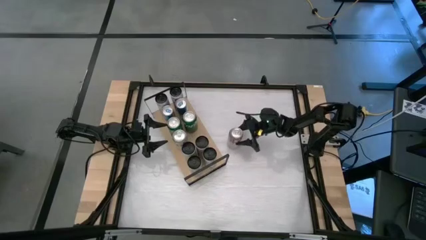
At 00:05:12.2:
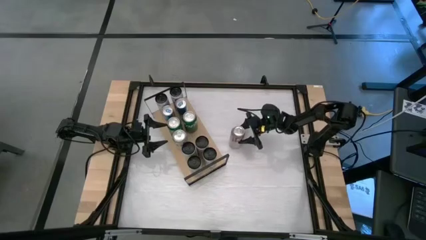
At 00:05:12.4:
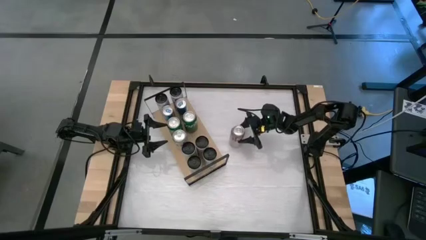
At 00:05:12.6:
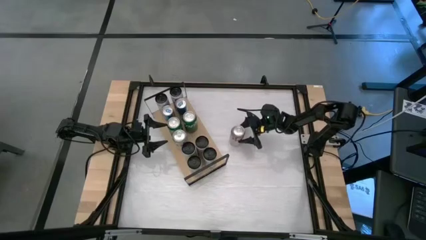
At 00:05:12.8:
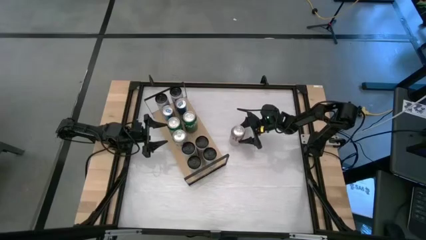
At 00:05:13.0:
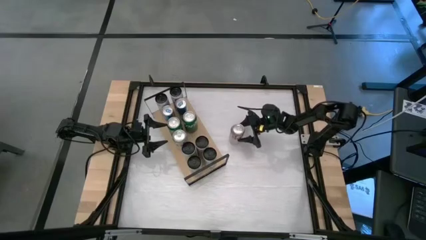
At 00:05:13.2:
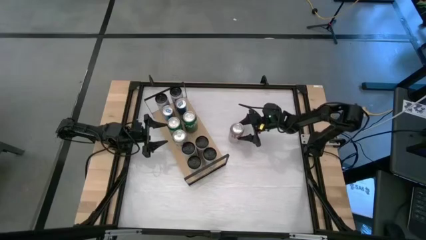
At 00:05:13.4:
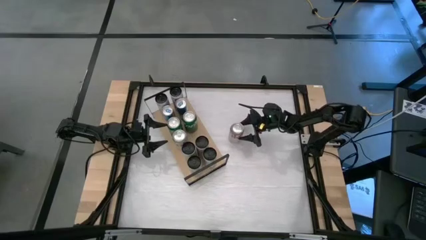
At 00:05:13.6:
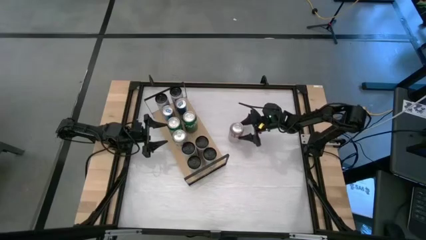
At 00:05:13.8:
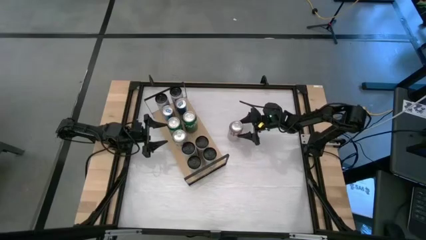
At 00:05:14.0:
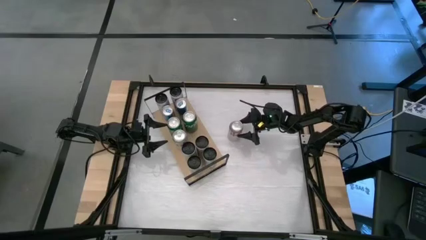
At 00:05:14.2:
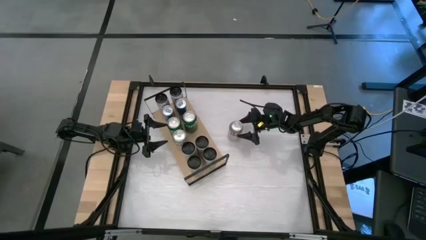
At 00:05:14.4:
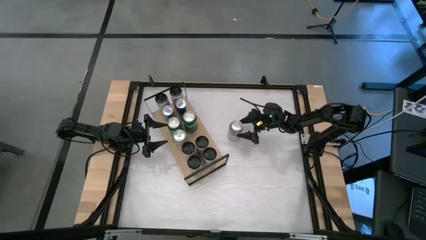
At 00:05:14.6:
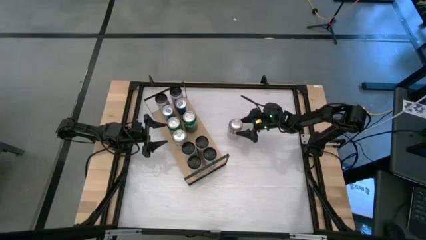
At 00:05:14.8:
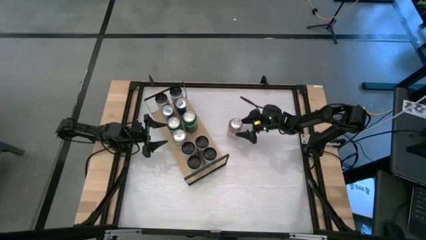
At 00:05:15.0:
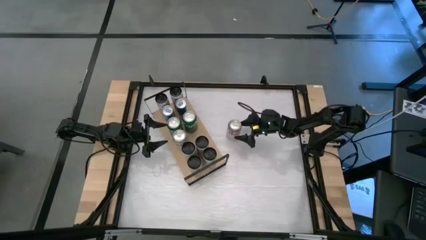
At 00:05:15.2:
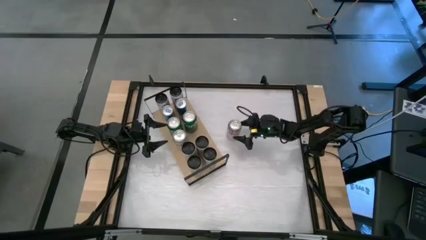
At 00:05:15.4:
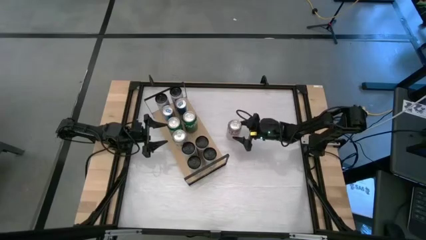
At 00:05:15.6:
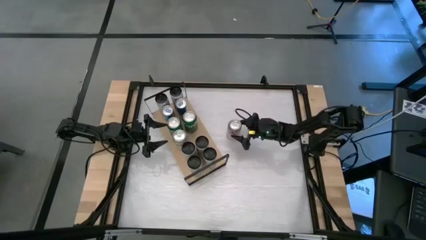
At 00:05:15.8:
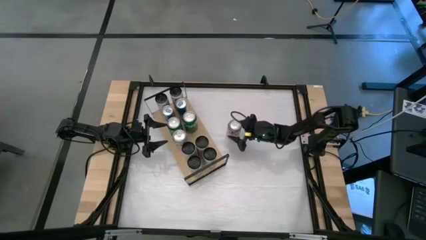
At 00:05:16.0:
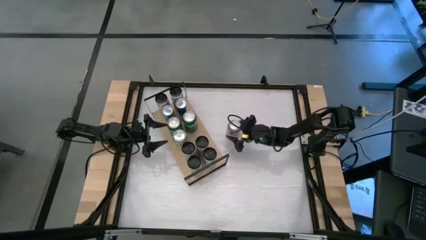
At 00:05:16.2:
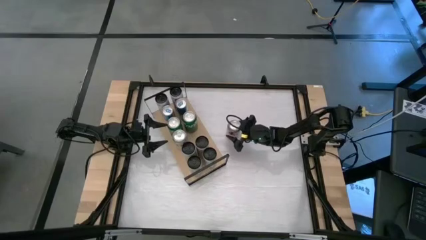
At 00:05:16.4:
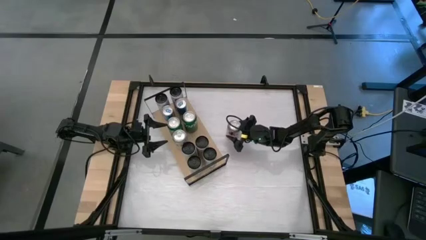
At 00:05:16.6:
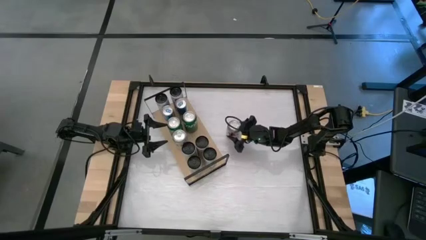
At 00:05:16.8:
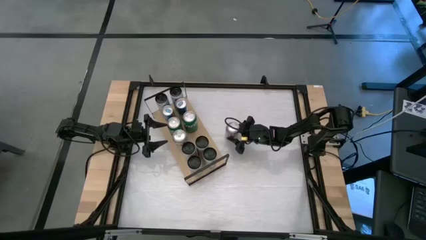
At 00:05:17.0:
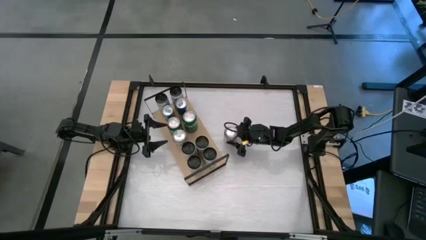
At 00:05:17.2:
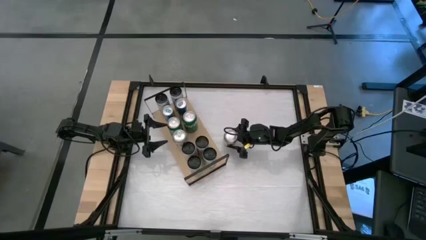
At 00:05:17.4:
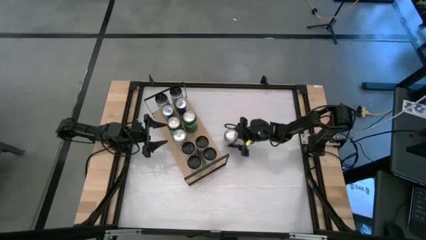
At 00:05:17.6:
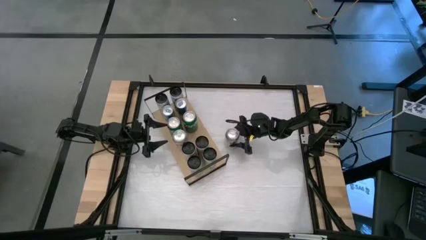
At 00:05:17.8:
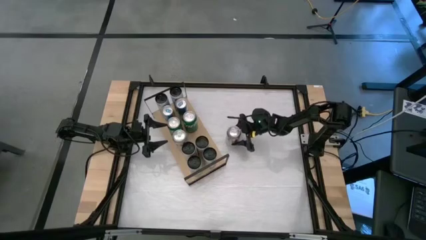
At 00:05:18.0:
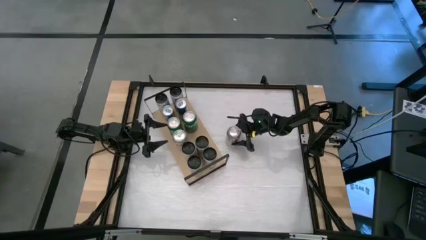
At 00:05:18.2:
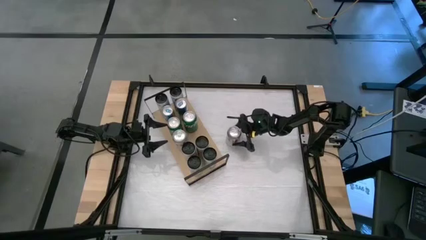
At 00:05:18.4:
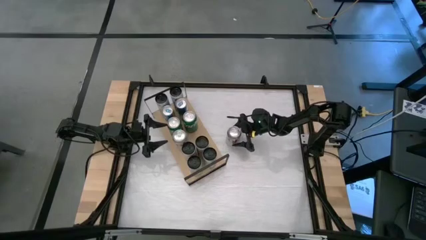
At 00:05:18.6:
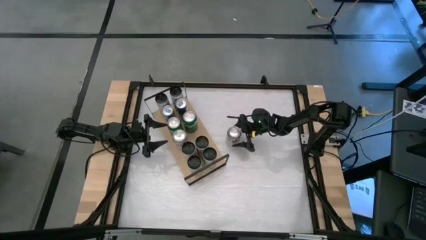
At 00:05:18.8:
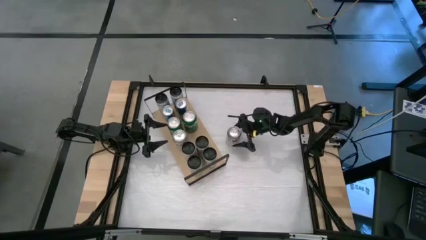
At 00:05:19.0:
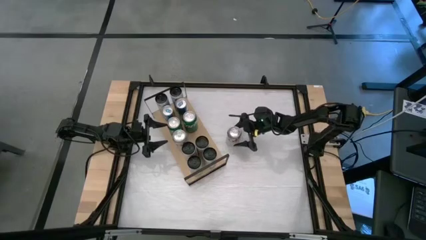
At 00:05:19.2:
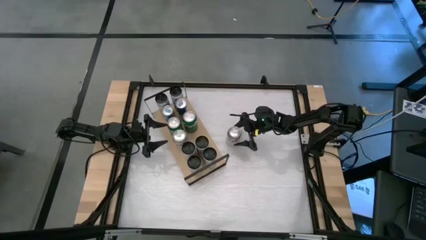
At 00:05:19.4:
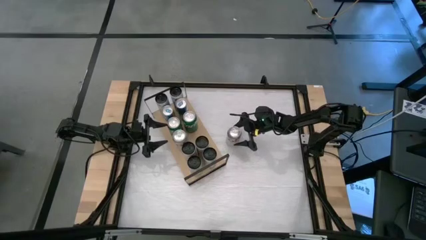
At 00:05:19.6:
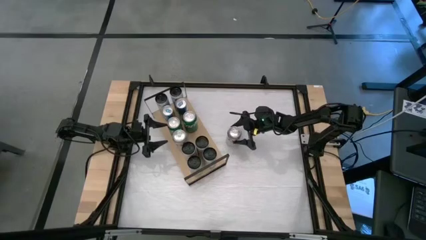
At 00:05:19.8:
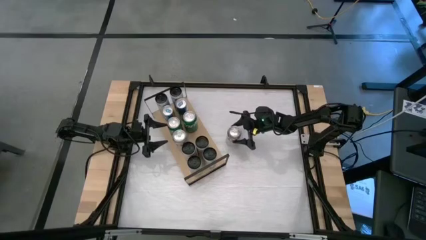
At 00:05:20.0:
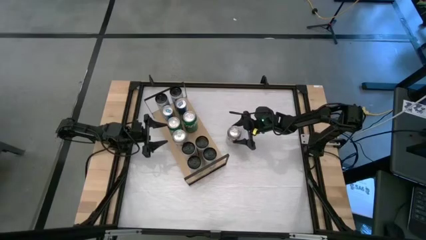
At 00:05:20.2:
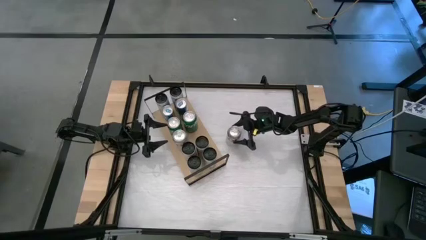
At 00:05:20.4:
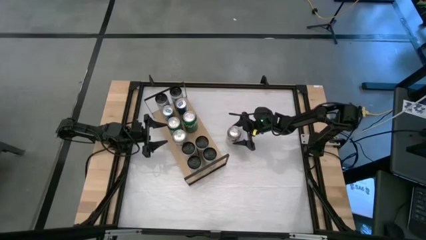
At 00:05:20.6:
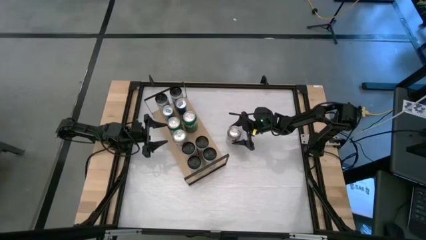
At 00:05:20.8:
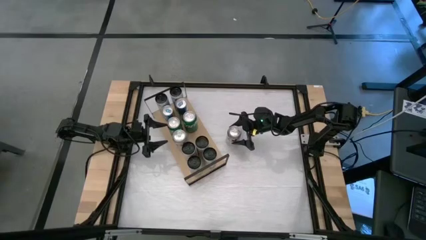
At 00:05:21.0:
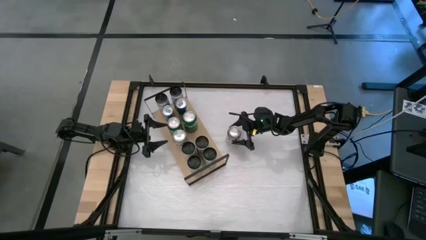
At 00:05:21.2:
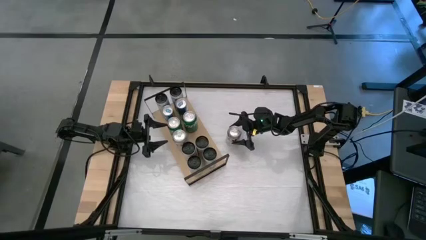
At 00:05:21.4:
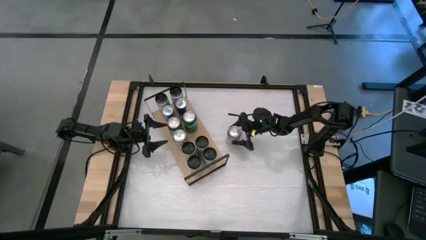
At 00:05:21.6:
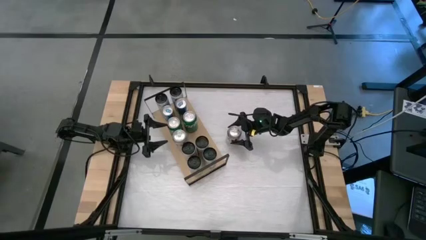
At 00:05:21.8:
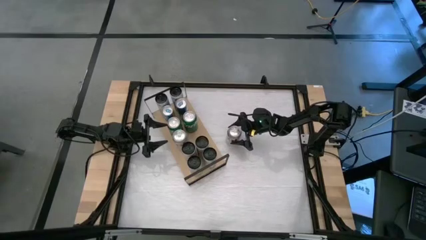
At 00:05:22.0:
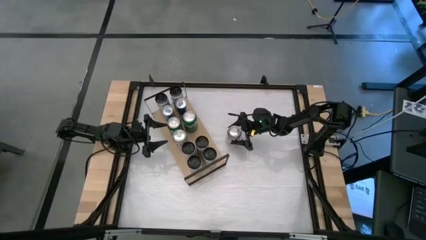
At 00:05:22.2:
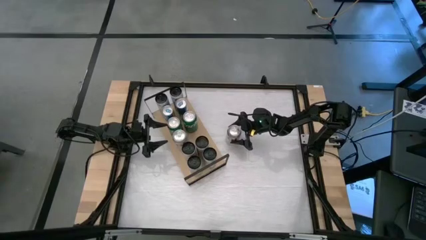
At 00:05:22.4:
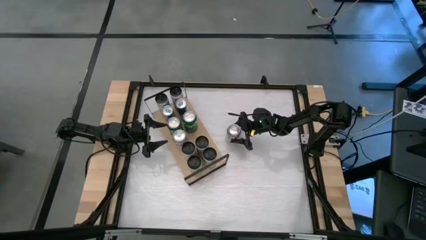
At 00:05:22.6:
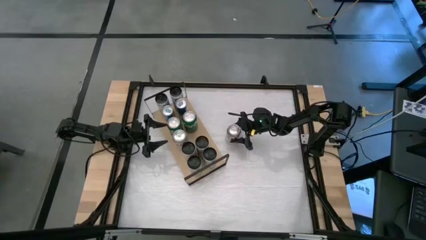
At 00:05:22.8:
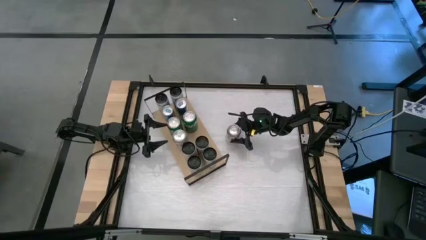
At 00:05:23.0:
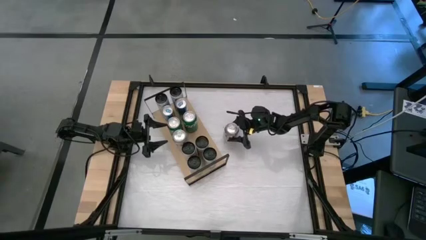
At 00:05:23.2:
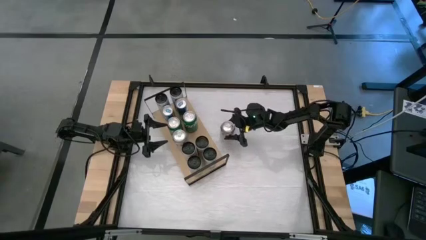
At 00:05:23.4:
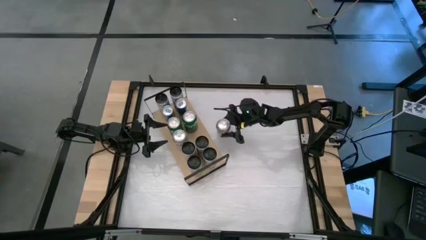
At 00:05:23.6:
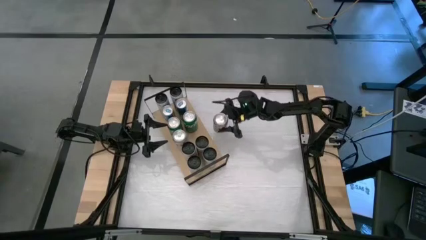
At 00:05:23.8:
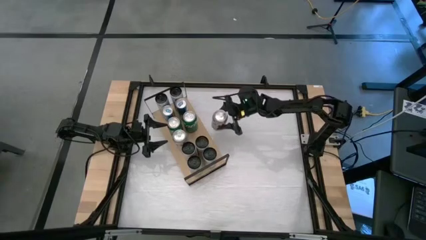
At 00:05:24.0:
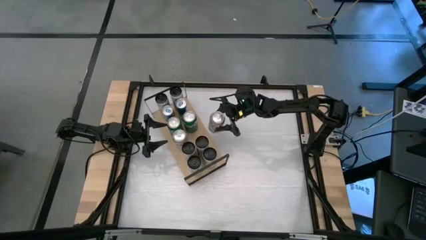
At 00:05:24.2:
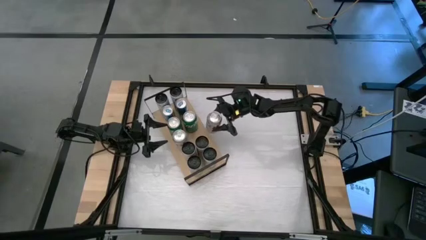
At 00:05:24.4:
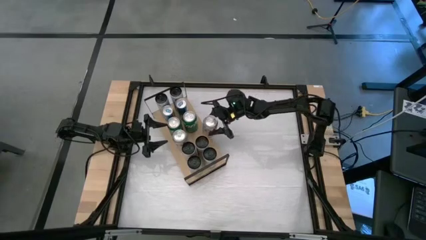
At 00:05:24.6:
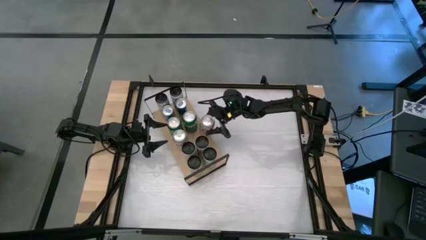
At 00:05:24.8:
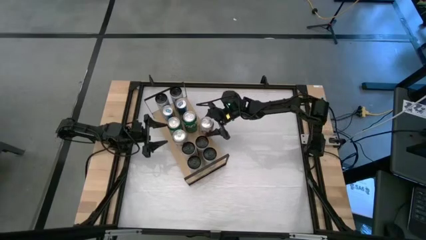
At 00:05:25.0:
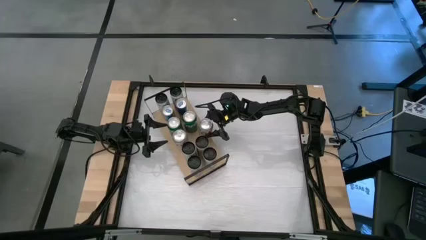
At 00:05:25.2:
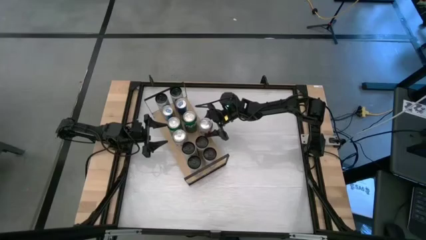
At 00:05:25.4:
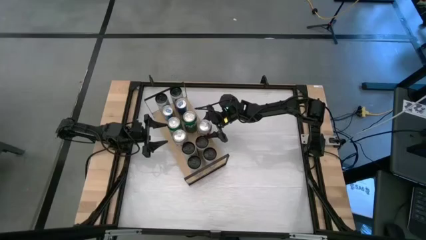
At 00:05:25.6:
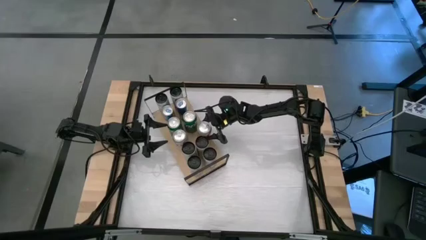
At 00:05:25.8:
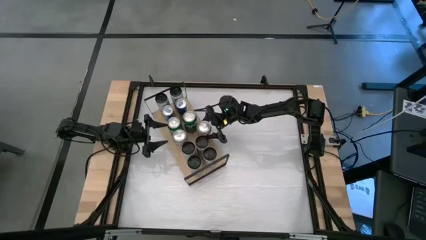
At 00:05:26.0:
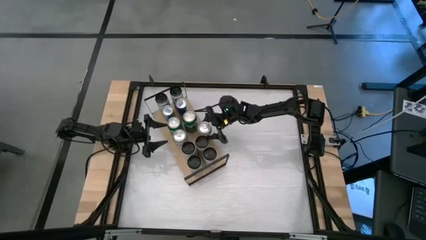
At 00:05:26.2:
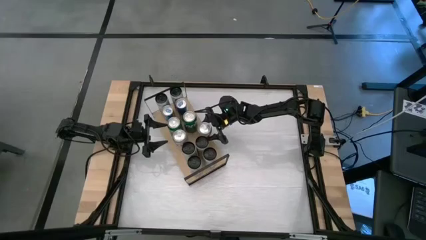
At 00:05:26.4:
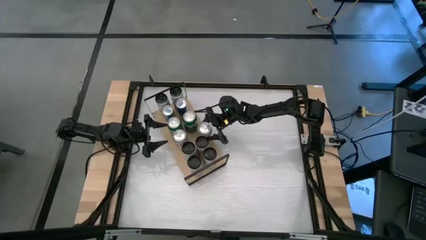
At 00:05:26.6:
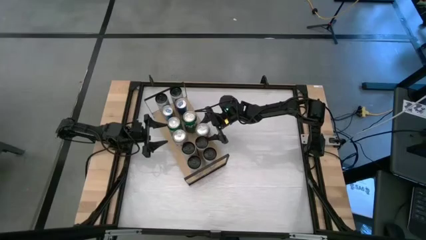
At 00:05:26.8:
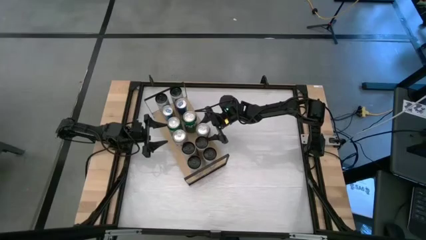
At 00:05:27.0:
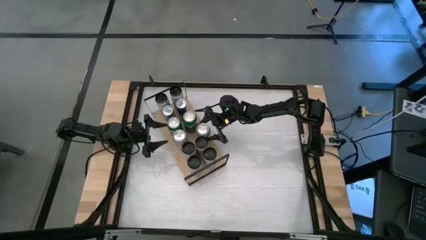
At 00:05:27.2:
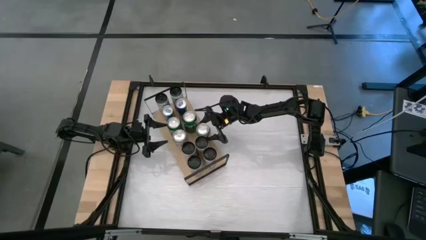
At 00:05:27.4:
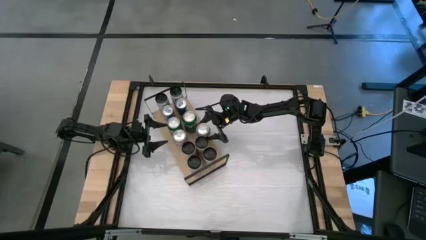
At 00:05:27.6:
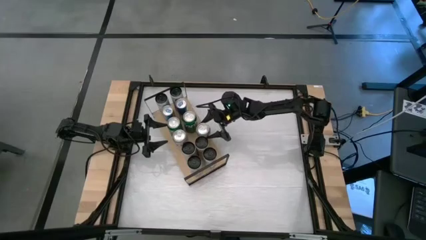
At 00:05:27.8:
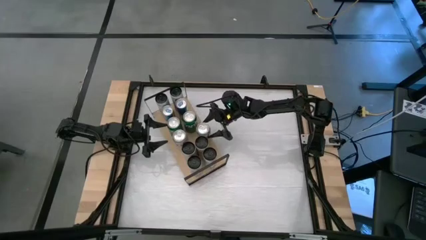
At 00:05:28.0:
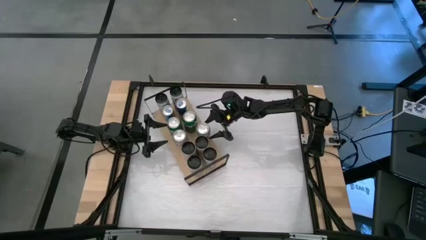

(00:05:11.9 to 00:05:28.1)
Task: Place canned beverage on shelf
Put the red silver soda can on the shelf aligned with the other red silver soda can
